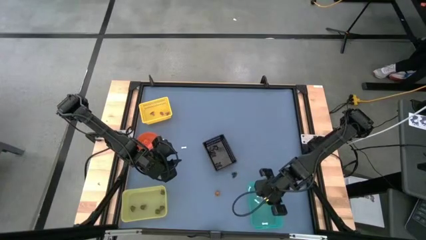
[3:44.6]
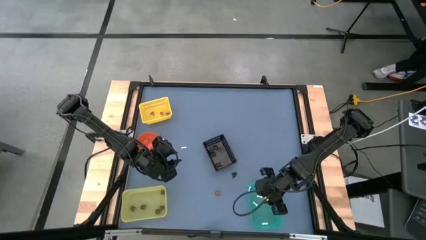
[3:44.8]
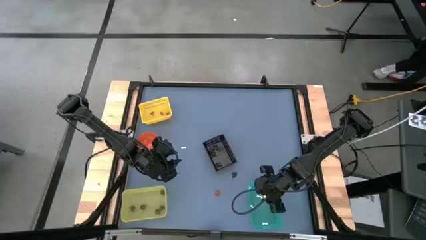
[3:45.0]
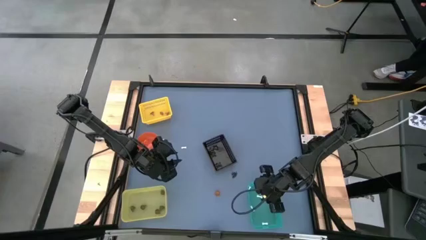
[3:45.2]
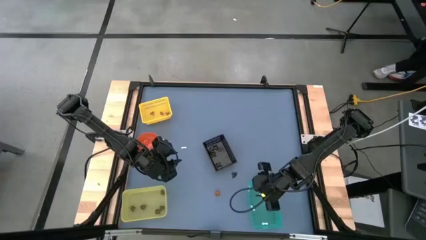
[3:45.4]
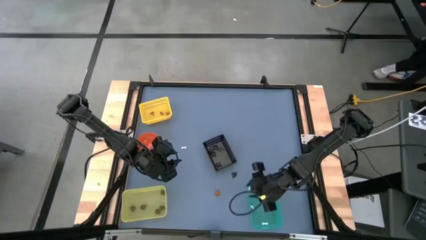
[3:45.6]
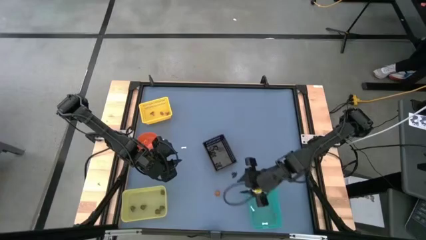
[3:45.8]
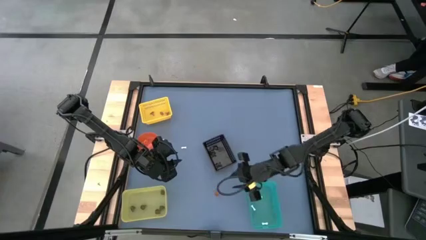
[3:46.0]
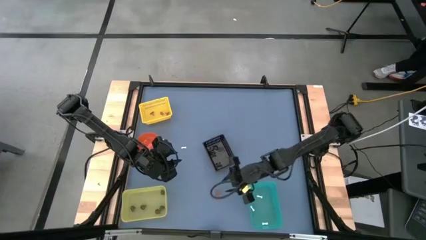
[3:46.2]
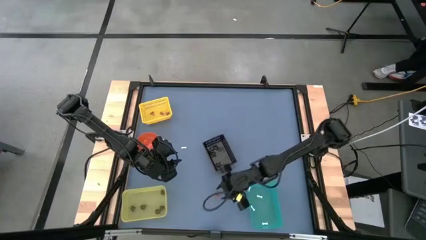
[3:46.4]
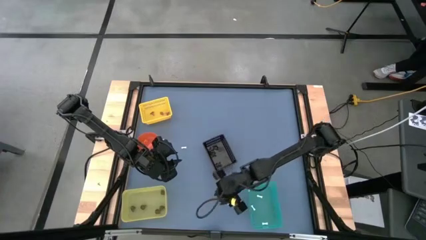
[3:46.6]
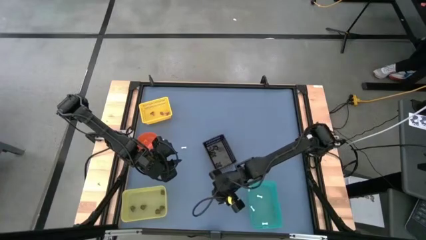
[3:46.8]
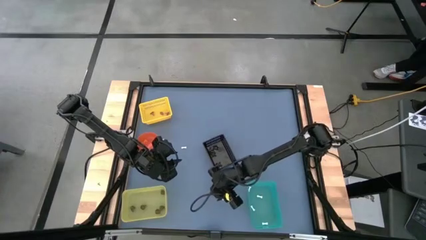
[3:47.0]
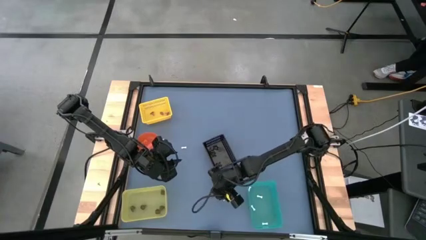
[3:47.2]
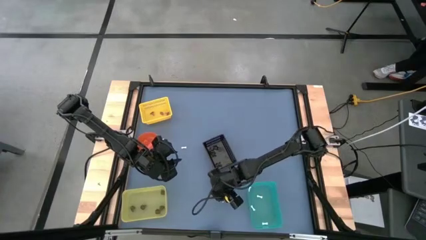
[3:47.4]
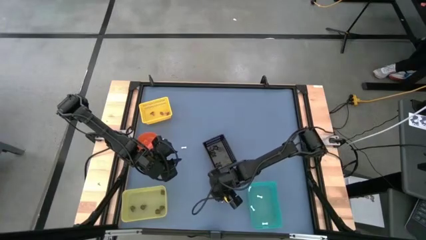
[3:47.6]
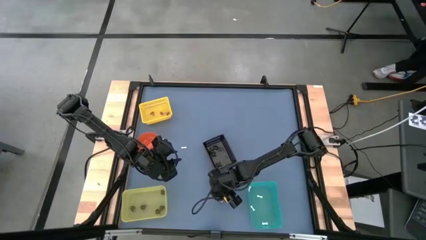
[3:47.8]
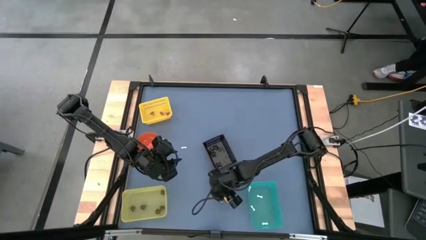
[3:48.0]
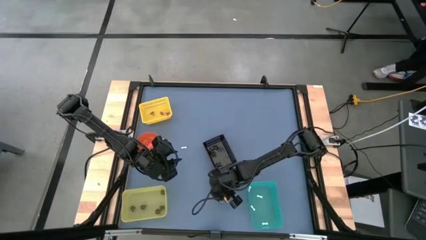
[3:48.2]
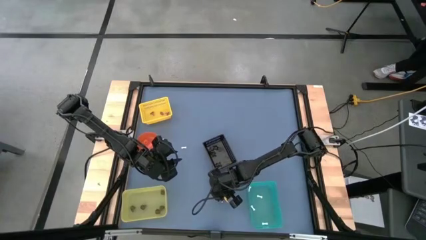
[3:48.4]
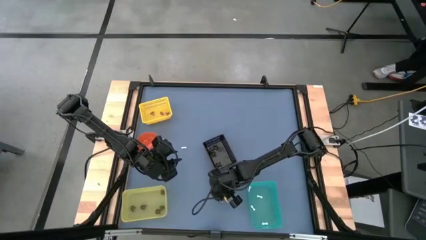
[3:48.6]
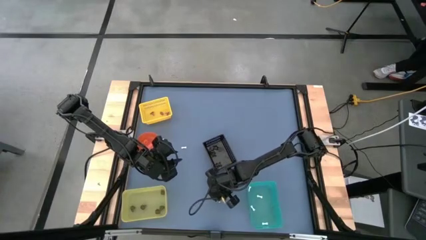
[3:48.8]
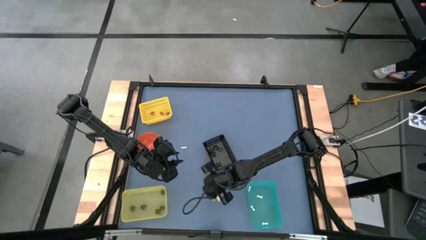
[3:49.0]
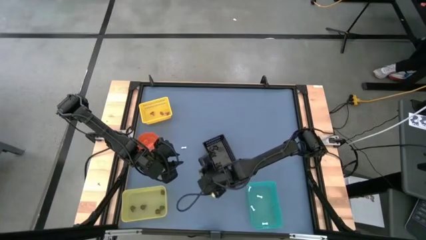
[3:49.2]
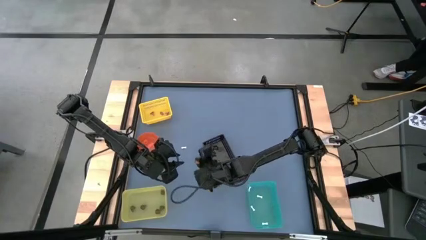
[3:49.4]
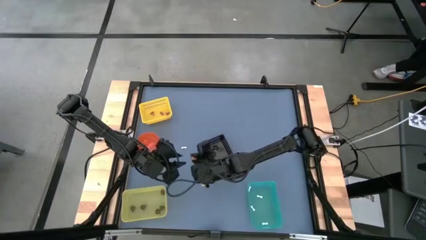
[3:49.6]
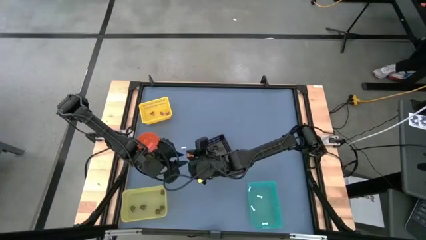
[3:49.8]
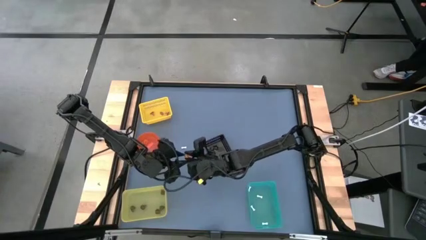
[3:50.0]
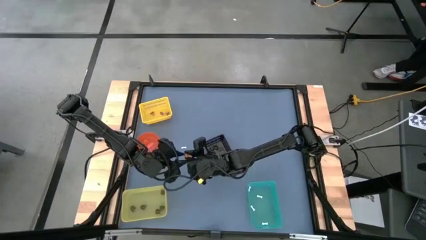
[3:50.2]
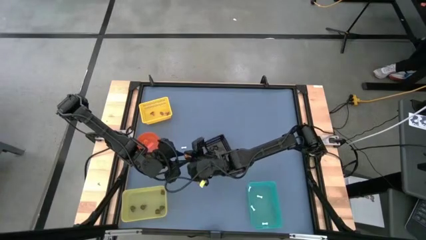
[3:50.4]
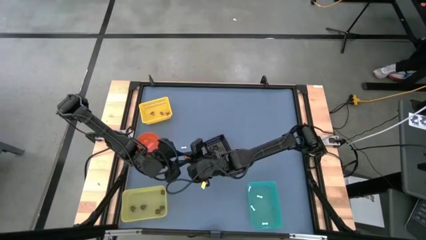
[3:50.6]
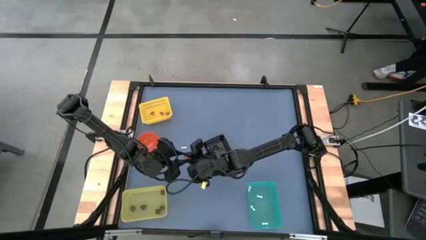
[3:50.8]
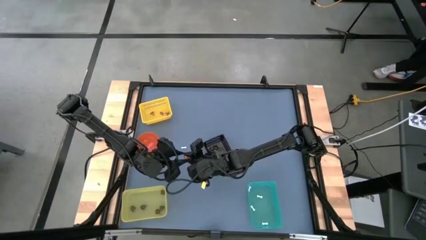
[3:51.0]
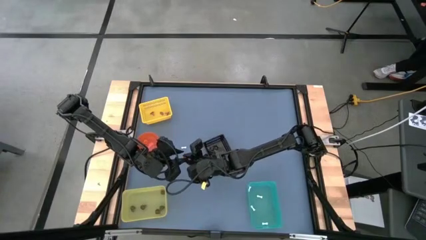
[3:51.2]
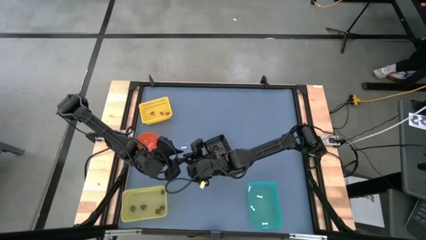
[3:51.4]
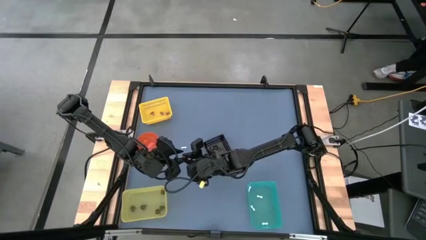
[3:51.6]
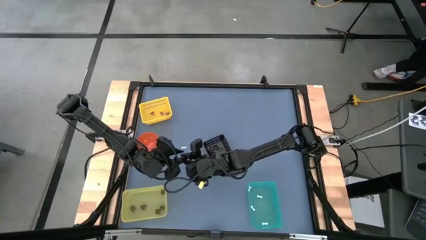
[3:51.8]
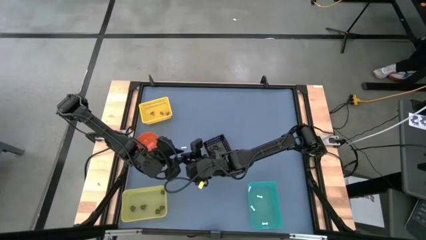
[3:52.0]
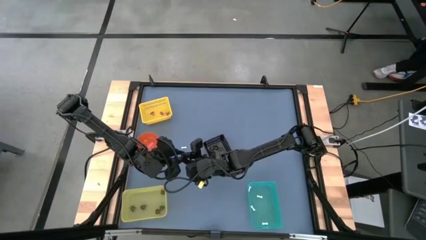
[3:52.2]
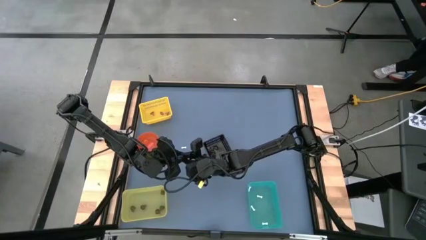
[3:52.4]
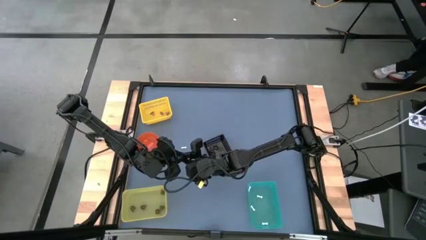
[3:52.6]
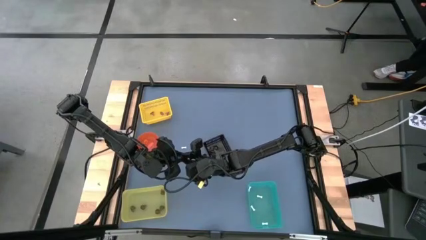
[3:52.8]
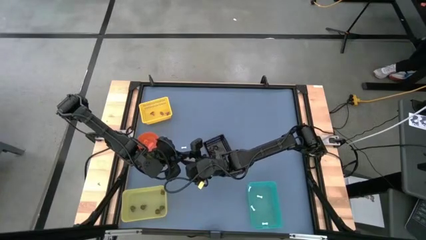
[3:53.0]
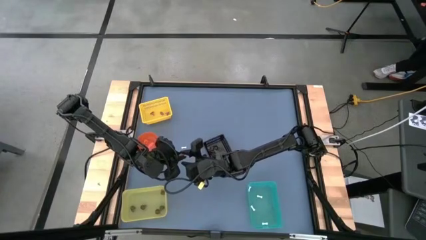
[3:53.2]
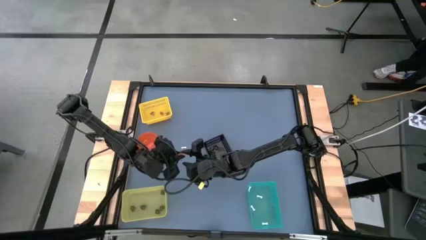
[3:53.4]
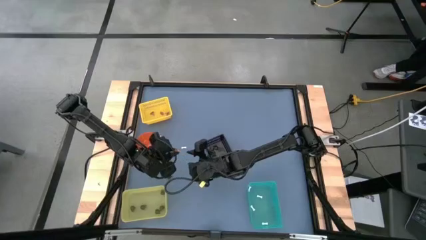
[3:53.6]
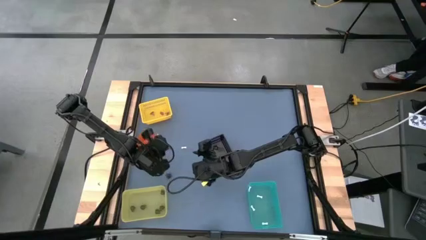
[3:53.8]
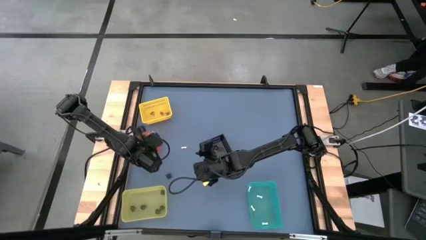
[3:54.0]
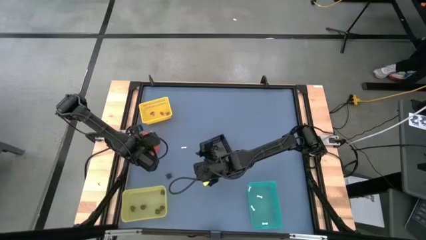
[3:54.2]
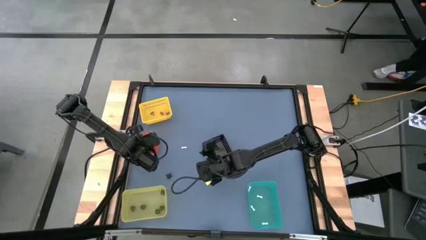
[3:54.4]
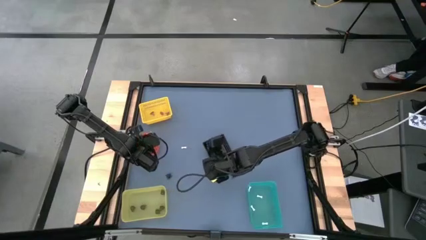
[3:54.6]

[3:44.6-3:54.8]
Task: Sort Halloween decoration
Put the orange pumpkin toy into the orange bin

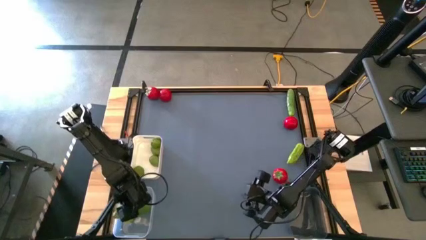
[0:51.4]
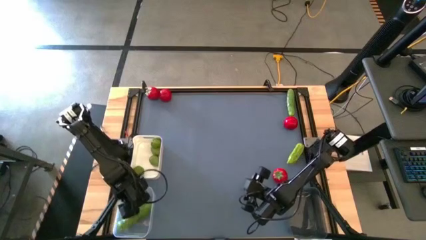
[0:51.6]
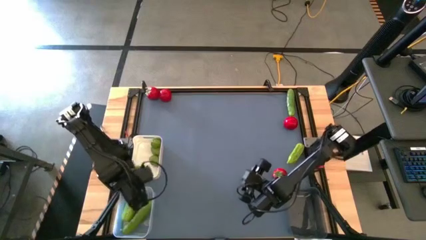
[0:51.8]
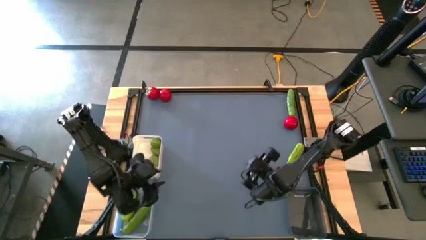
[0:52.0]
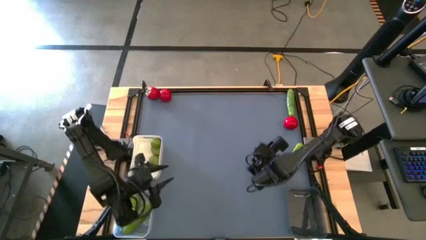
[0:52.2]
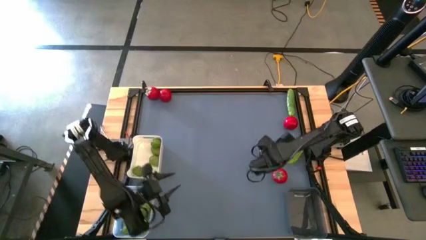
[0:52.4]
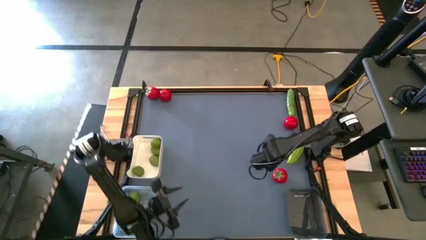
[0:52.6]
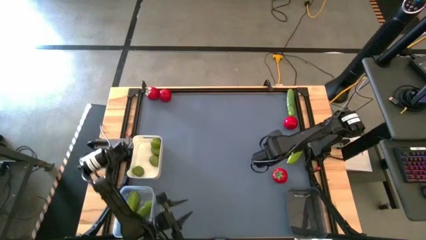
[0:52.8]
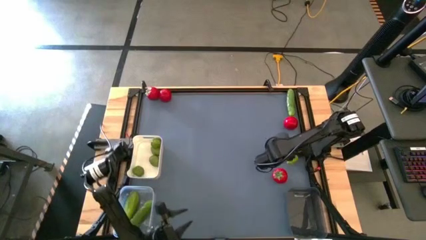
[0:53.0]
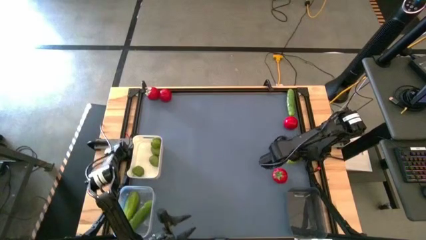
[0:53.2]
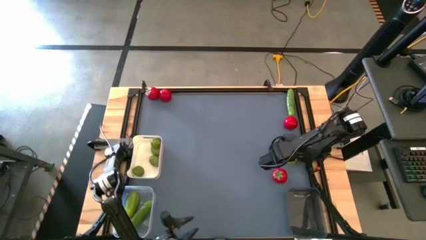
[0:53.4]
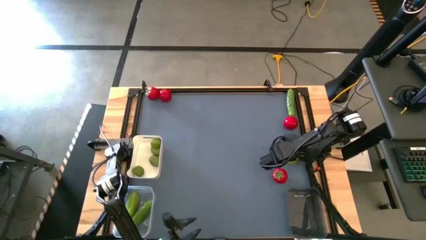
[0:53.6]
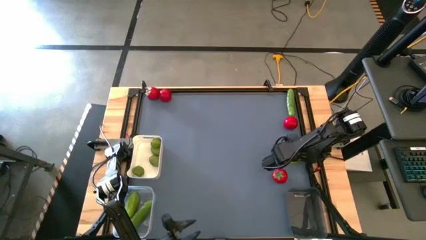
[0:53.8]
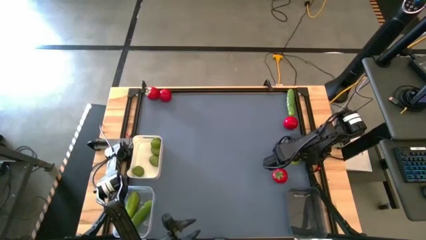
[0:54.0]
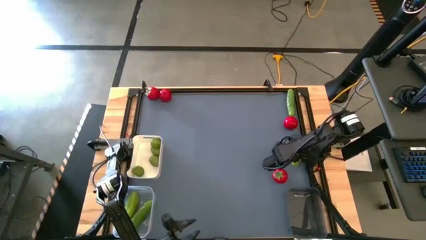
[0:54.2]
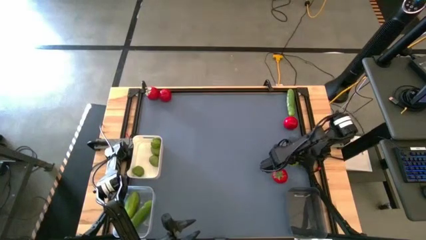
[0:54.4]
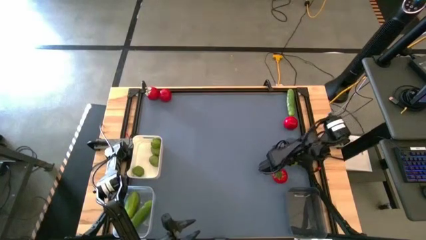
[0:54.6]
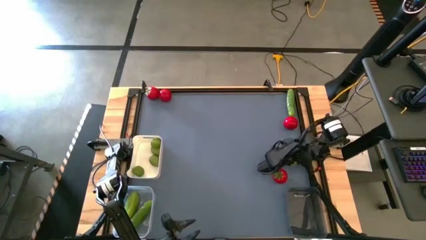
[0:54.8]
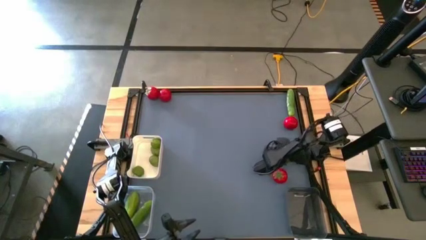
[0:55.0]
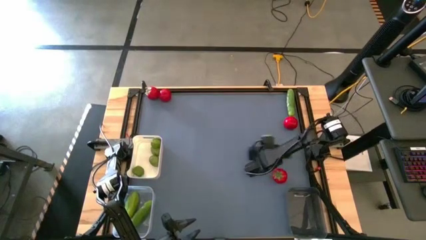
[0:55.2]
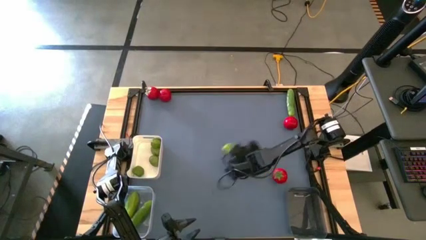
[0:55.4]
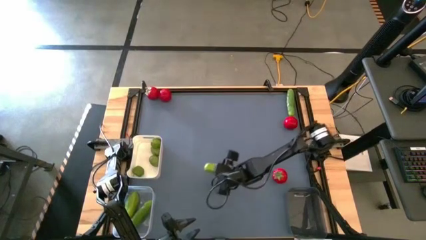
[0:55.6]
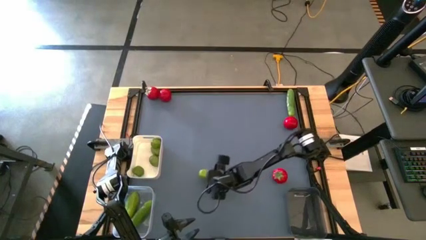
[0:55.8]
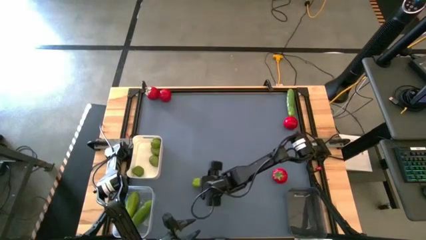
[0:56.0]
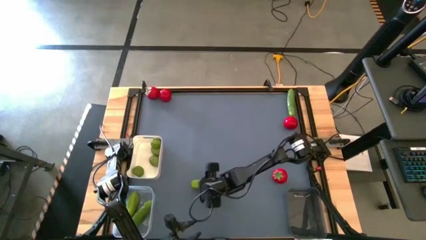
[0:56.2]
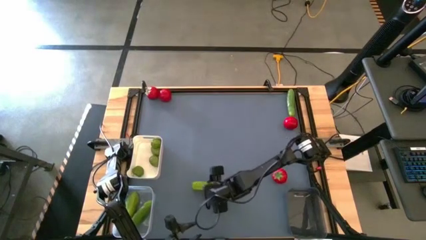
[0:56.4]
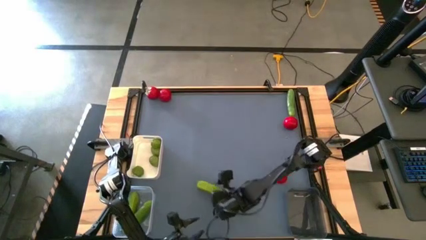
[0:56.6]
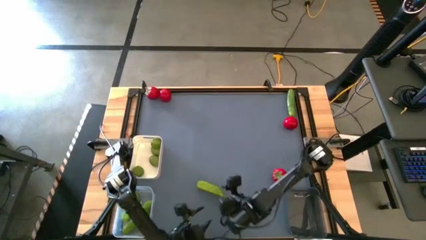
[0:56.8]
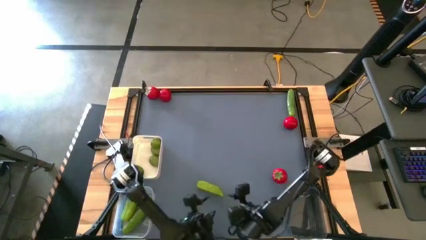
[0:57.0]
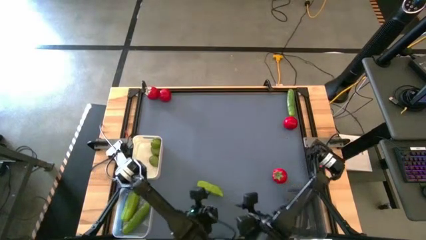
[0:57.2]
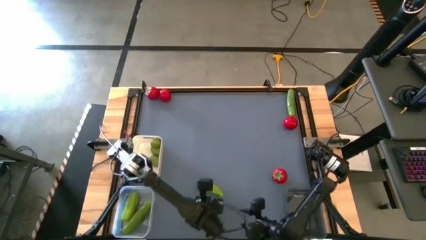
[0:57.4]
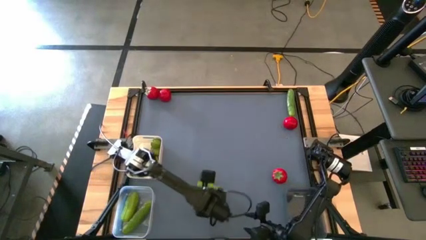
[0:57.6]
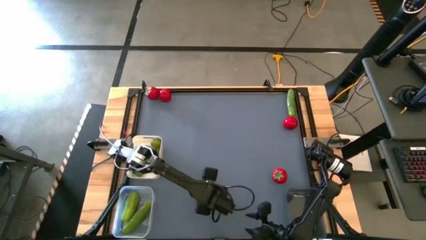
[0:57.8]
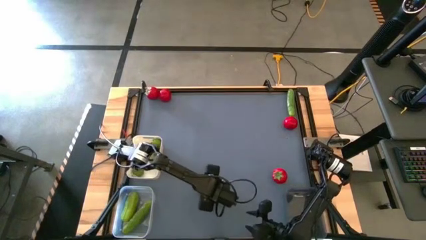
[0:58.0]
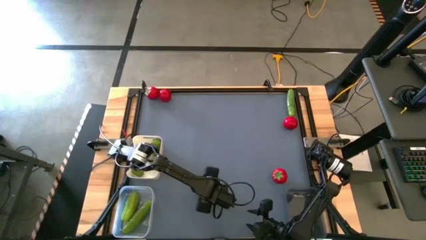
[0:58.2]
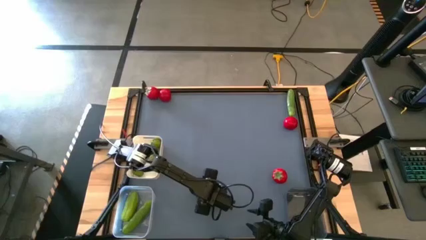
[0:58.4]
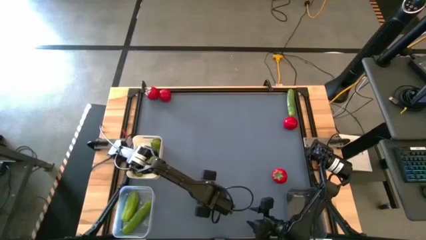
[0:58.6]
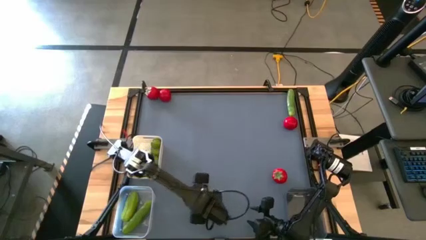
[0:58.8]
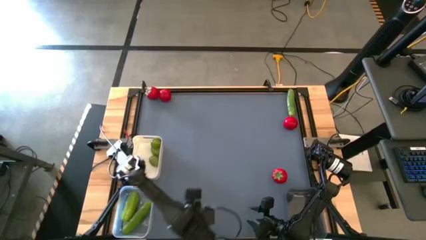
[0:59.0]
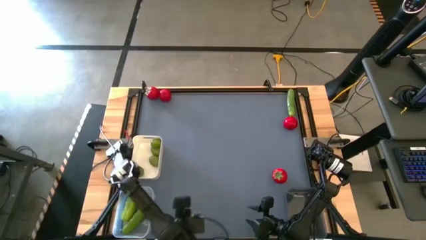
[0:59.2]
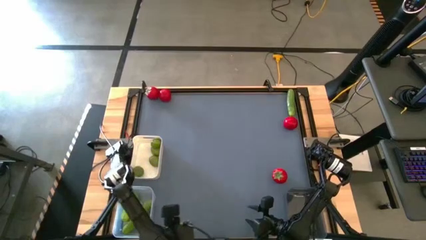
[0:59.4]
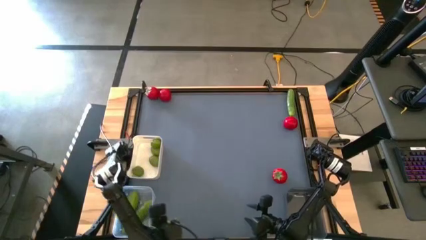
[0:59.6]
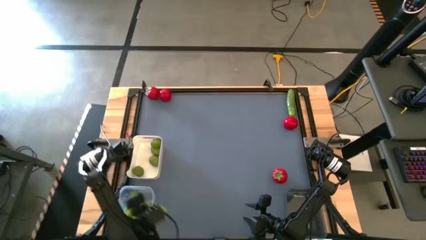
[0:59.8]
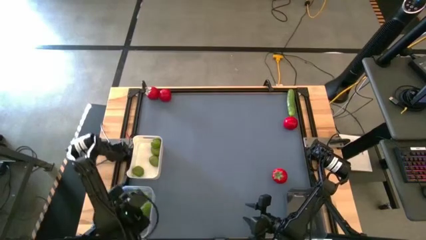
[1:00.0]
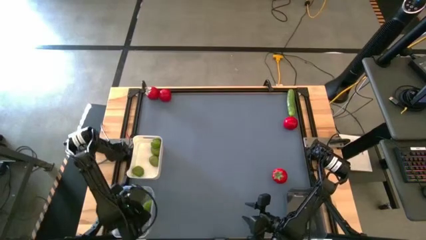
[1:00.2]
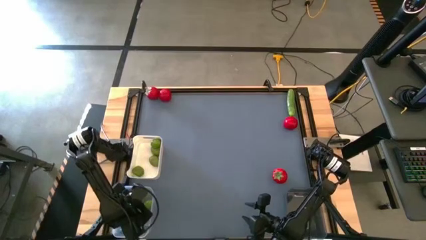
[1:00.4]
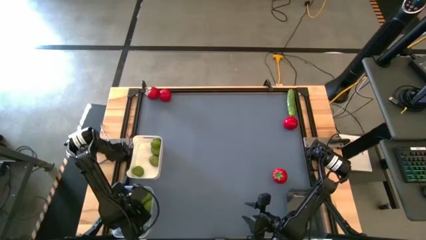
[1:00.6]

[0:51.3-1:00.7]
Task: Sort produce into baskets
Put the green cucumber into the transparent bin
